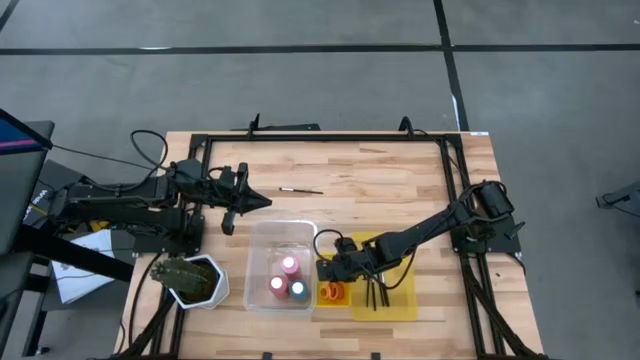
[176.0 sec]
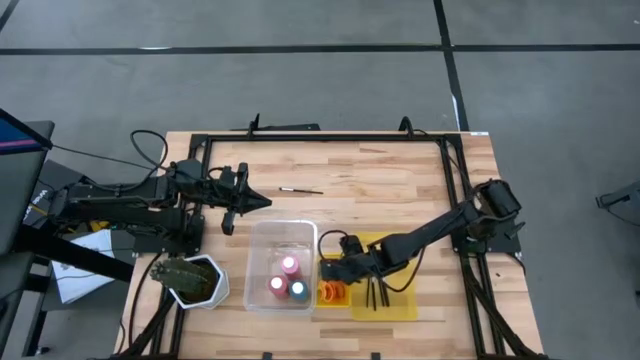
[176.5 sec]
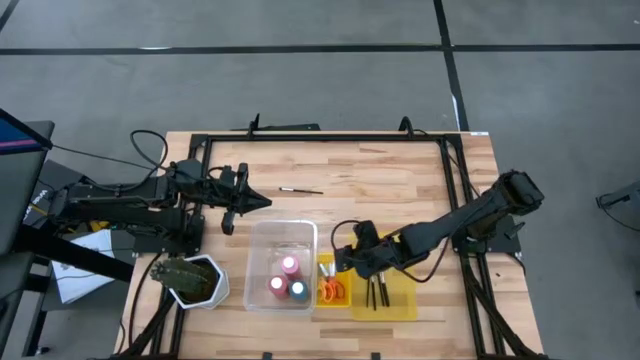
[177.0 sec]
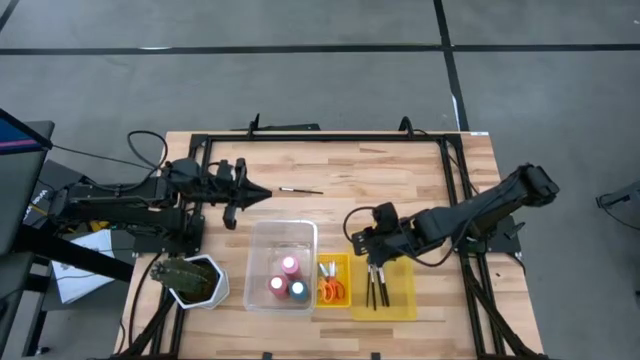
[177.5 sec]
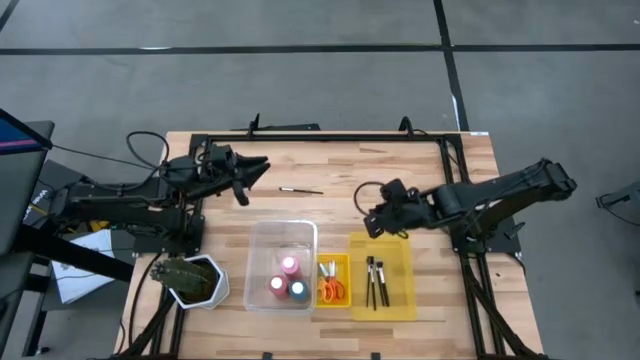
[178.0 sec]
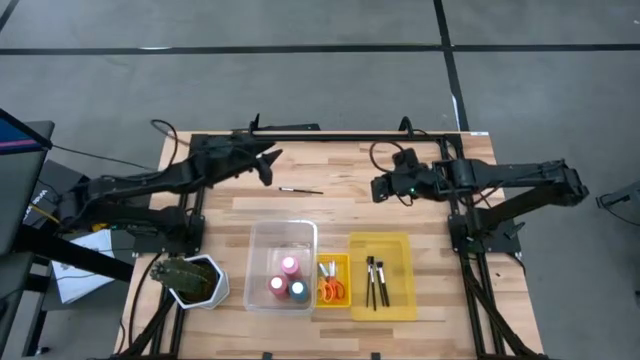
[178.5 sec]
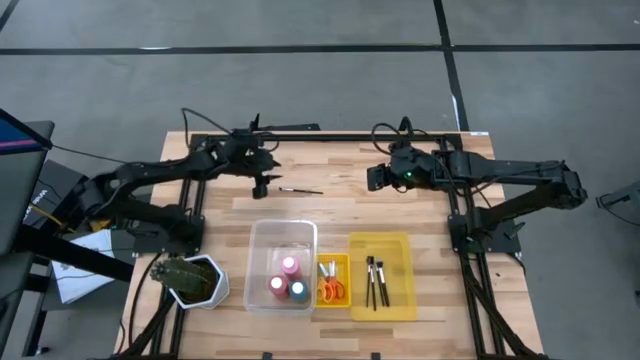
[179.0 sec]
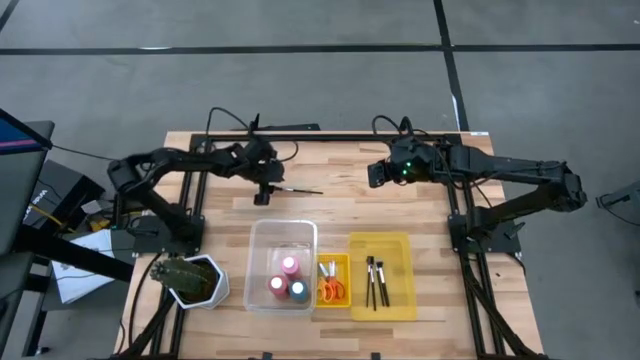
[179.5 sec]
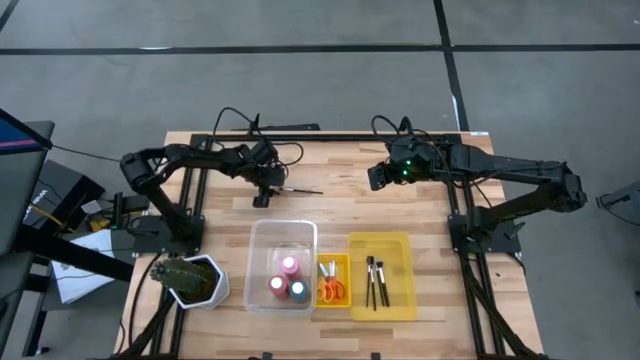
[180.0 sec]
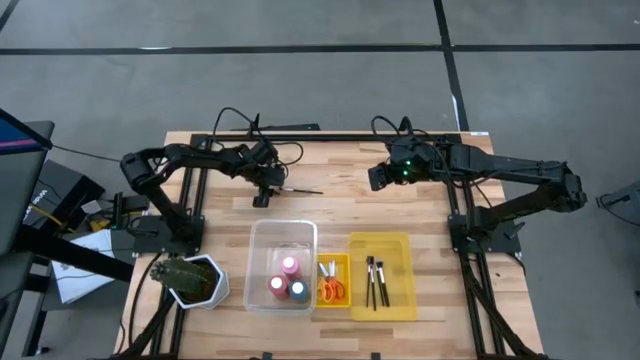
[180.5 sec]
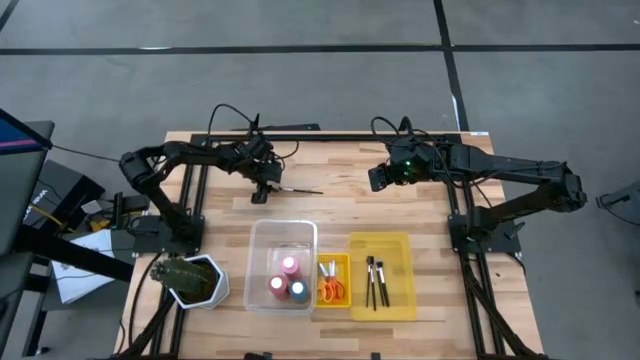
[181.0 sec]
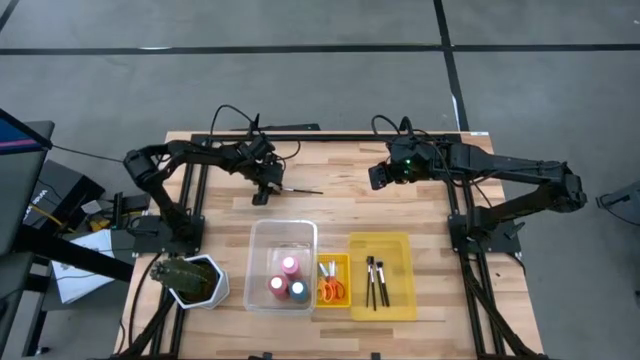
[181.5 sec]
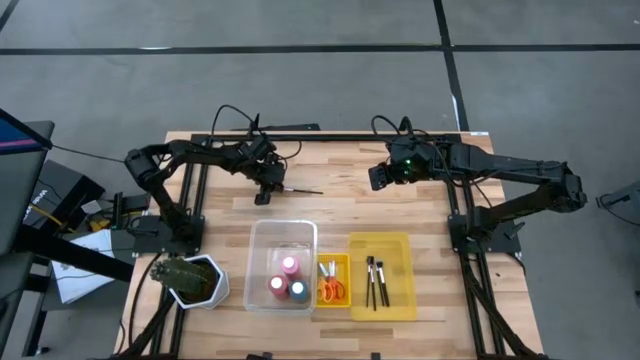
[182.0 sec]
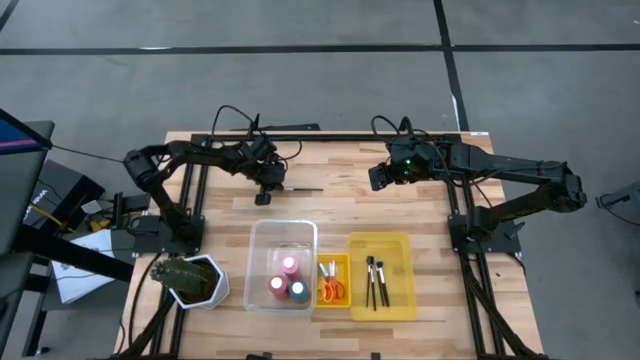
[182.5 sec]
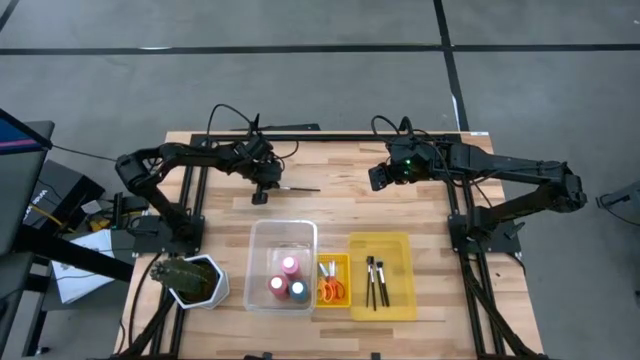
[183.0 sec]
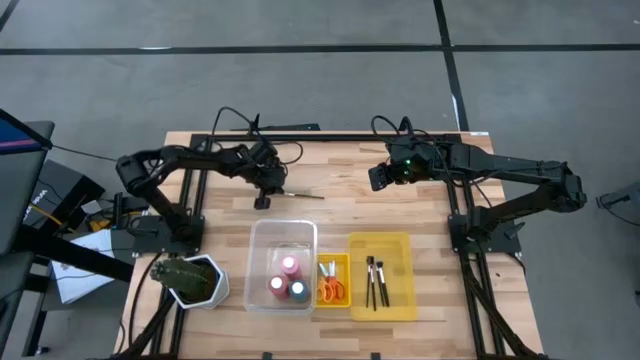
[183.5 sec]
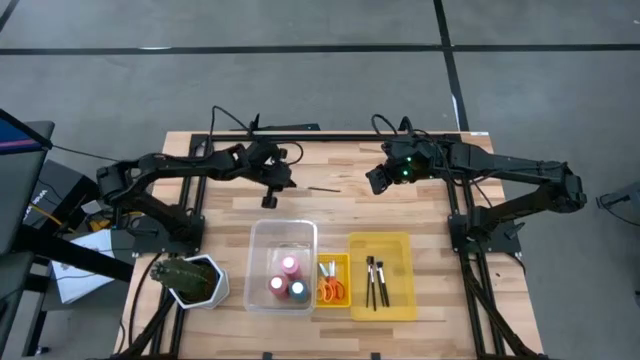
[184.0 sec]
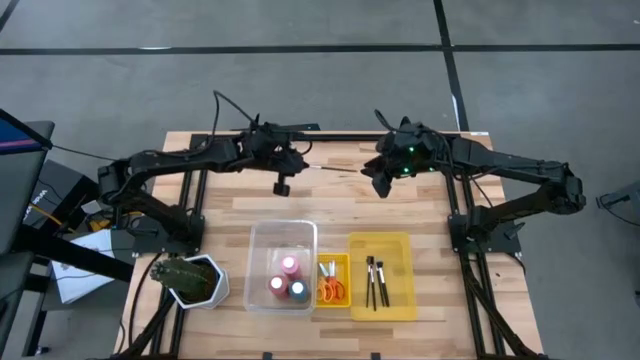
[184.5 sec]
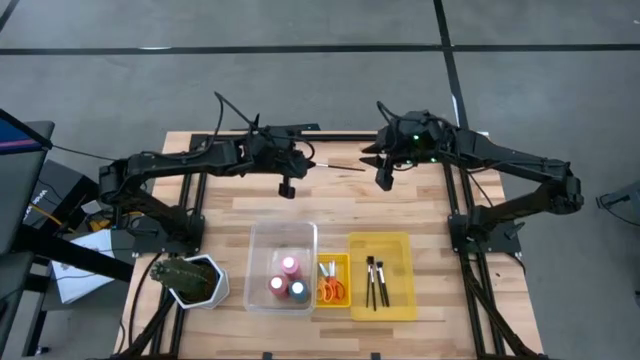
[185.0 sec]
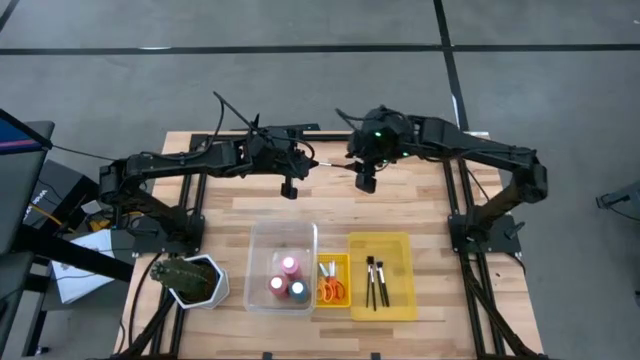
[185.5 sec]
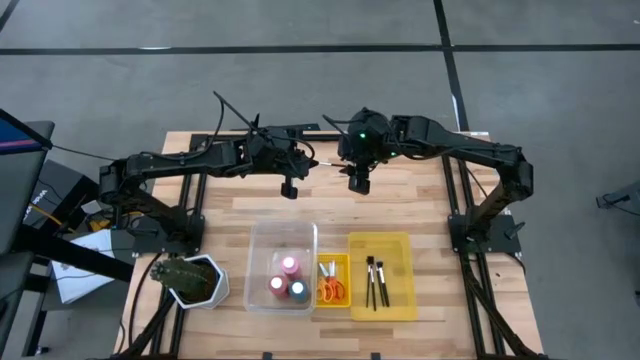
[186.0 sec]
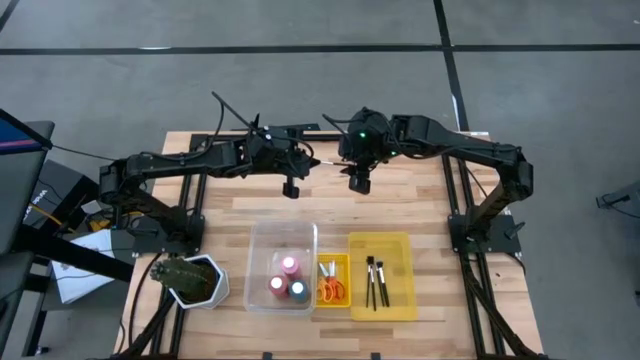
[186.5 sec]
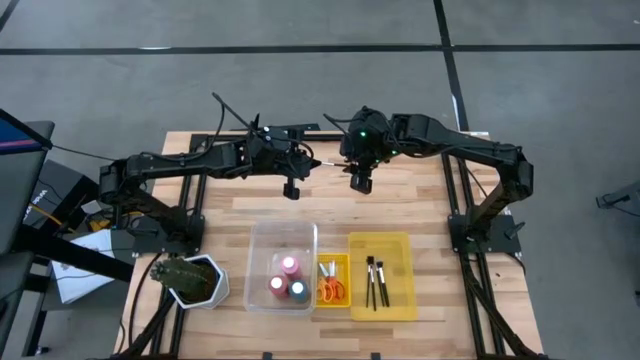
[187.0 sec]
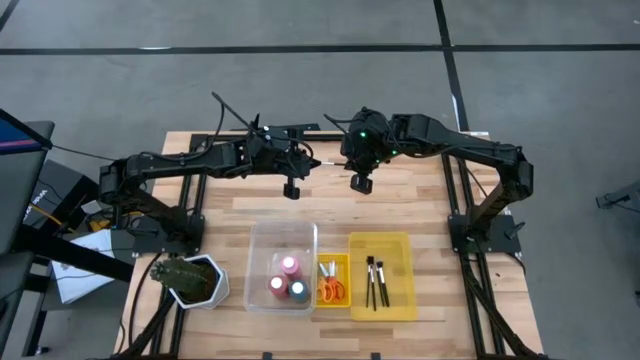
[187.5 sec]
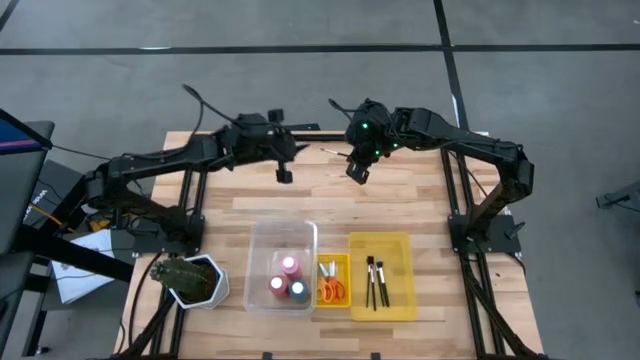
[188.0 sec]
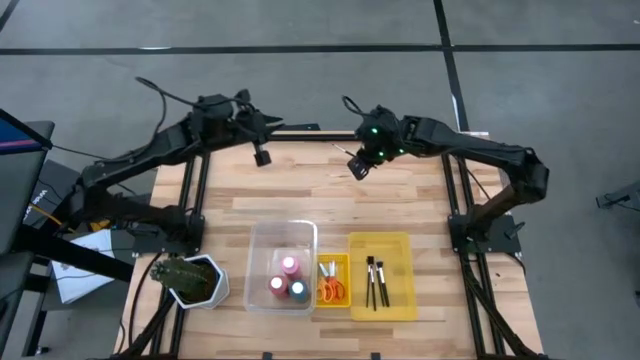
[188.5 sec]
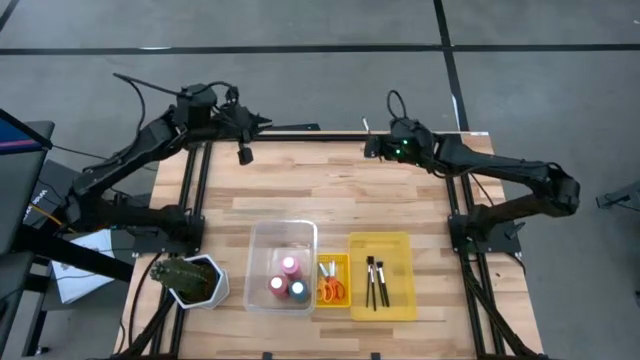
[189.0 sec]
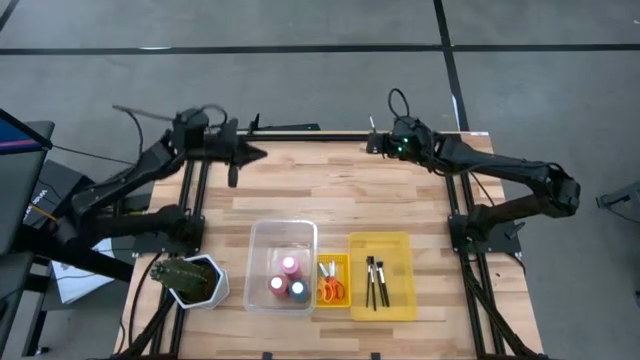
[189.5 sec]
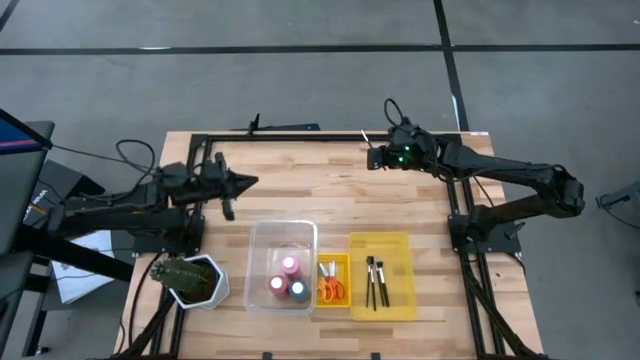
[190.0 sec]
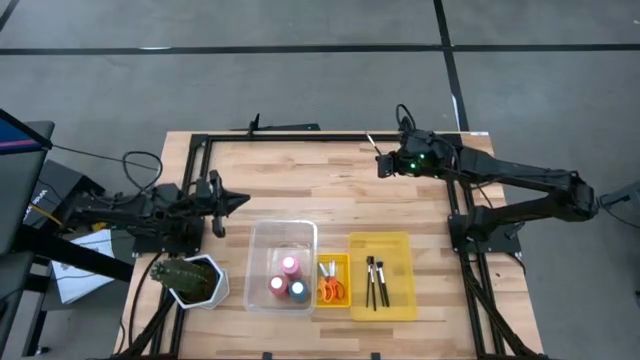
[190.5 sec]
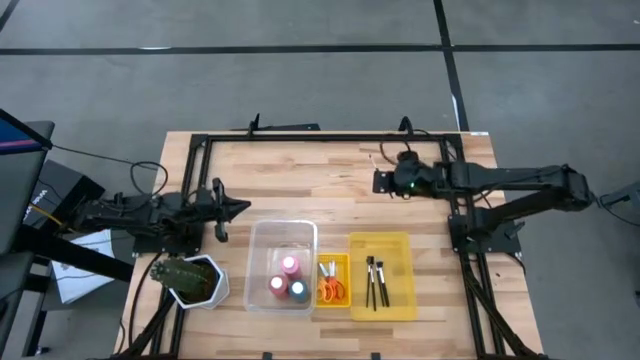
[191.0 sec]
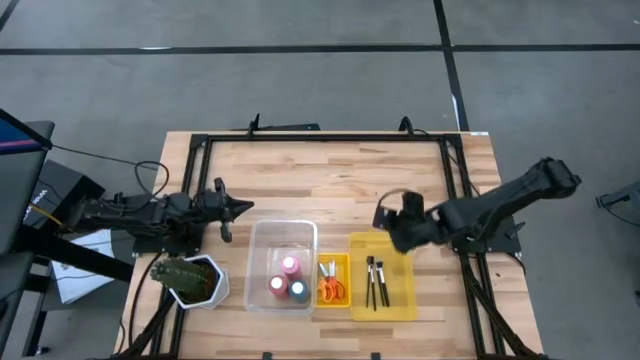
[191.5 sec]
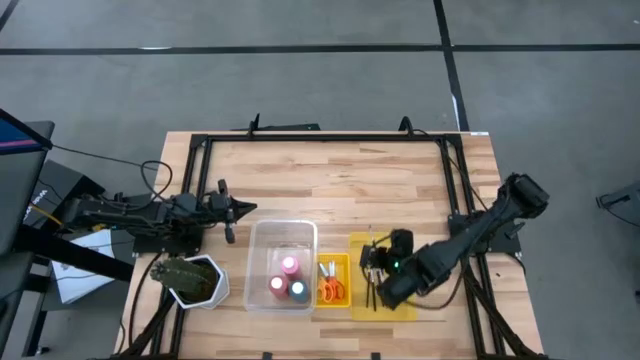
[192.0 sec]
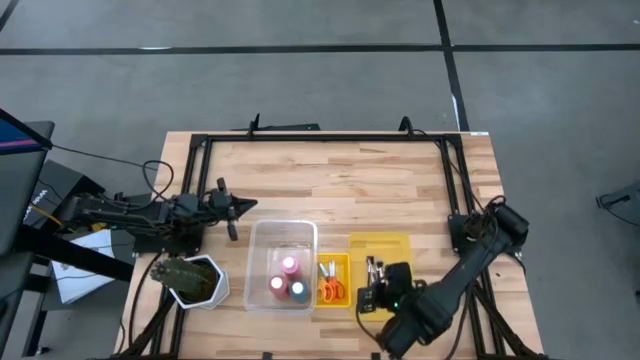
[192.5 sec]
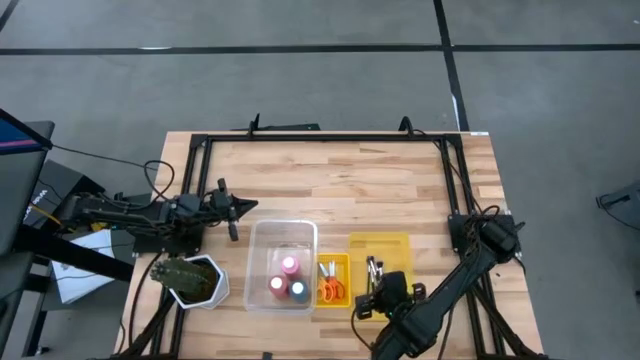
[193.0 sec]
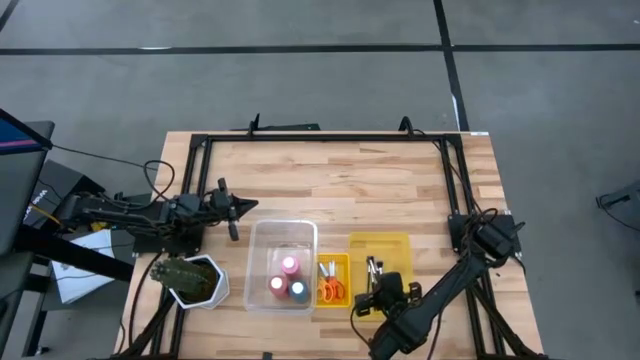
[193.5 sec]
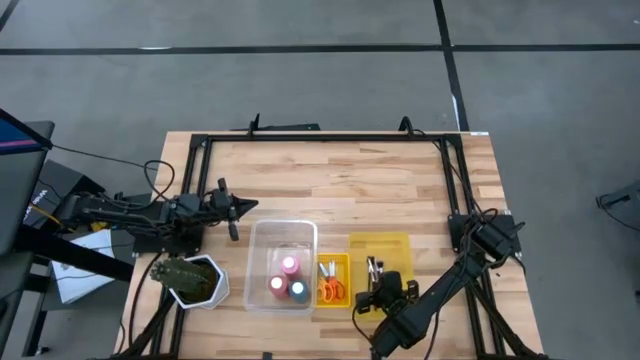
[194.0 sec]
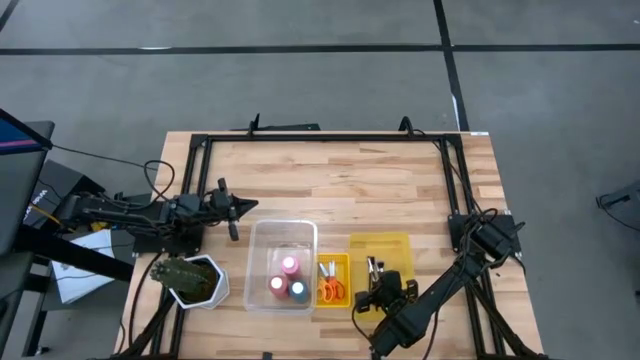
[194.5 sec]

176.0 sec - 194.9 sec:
Task: Pick & Place Paint Supplies
Put the black paint brush into the right yellow bin

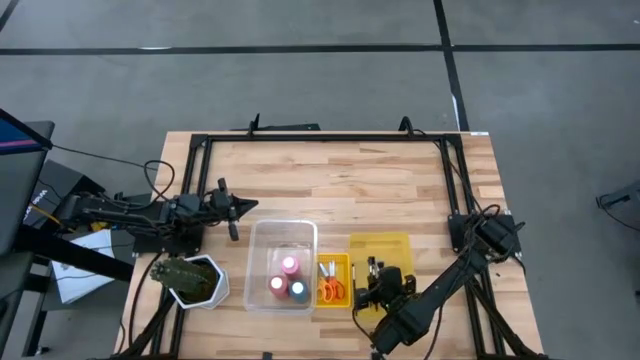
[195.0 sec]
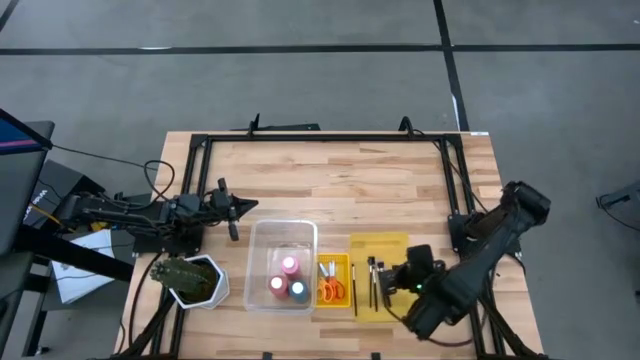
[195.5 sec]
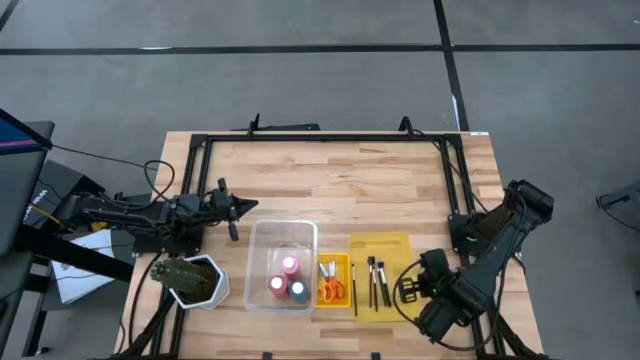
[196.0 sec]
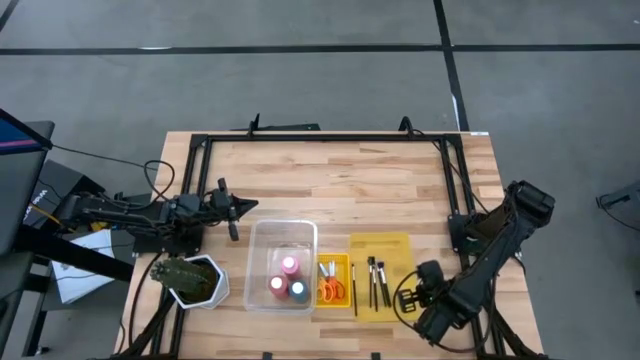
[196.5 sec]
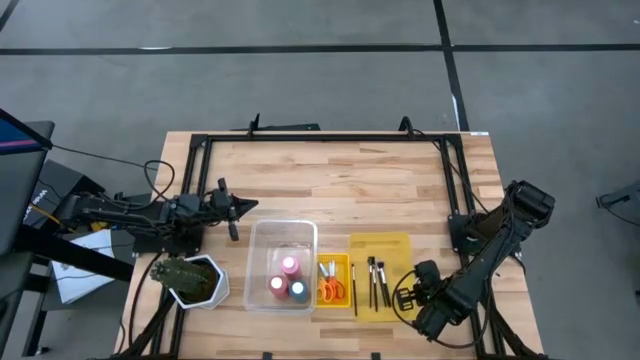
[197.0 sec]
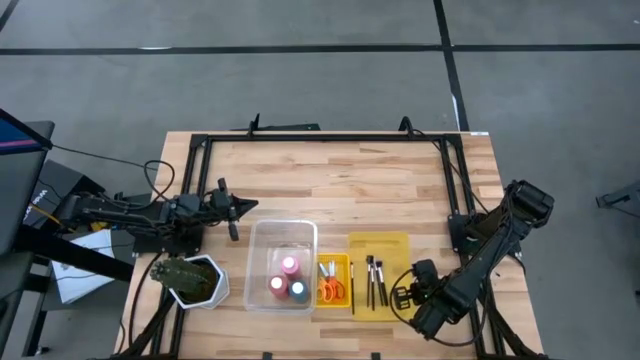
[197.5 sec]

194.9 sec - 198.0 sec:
Adjust the right yellow bin
